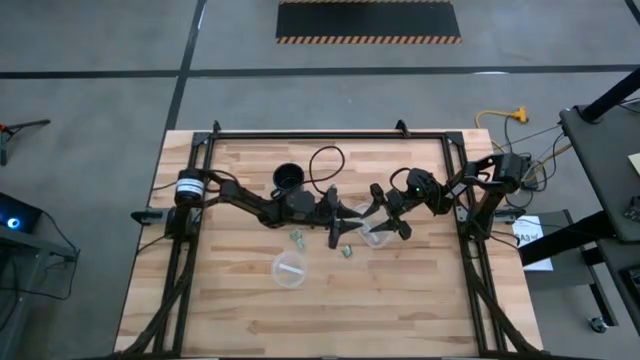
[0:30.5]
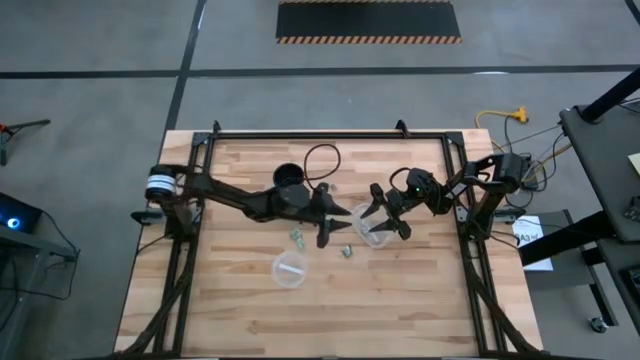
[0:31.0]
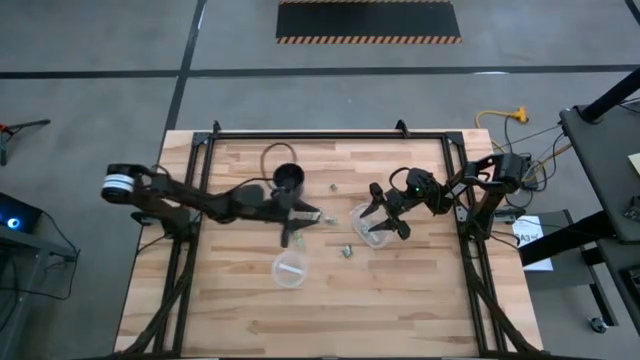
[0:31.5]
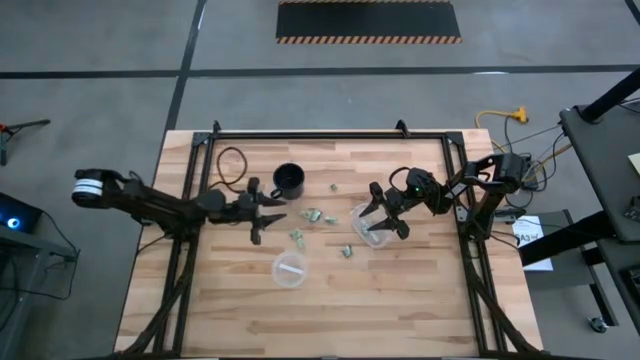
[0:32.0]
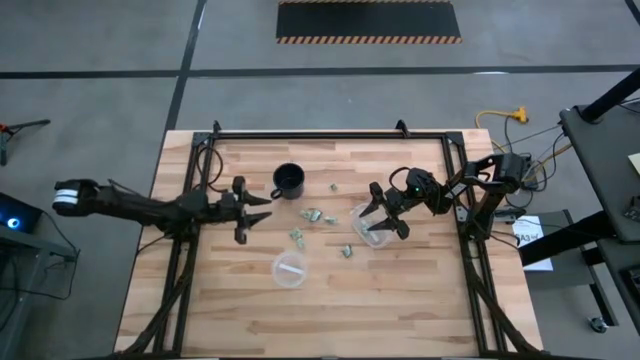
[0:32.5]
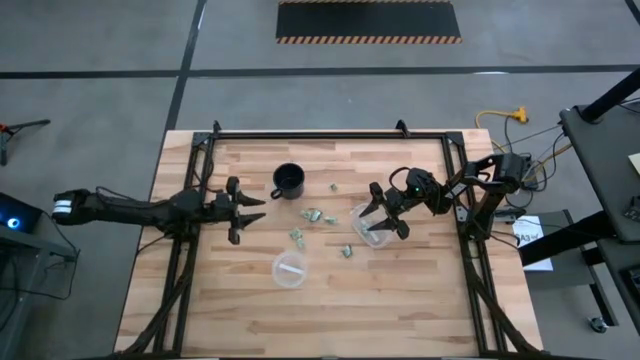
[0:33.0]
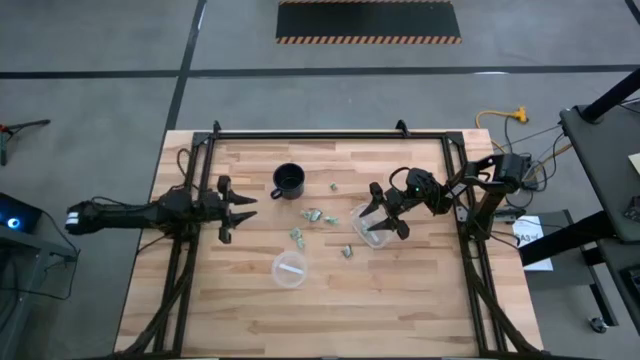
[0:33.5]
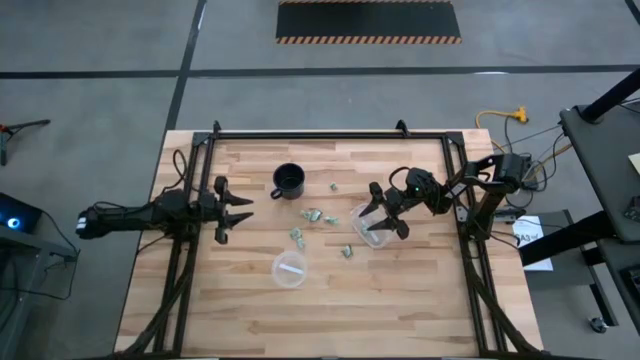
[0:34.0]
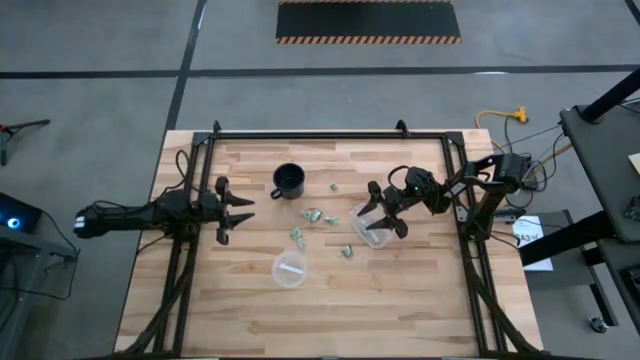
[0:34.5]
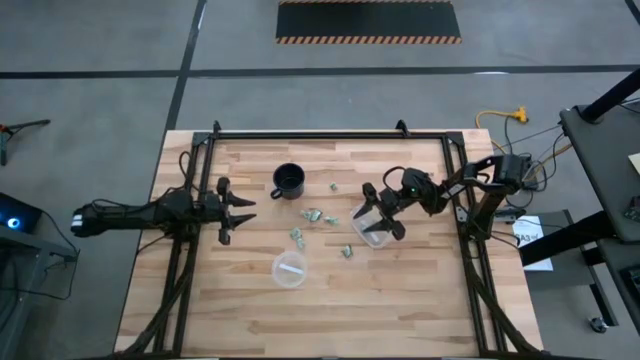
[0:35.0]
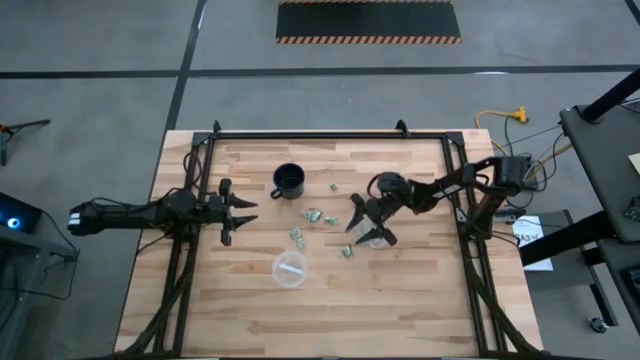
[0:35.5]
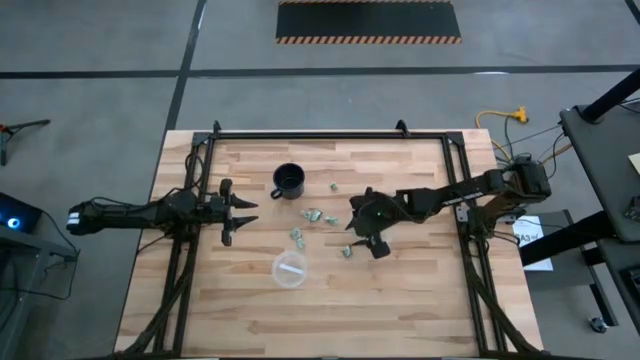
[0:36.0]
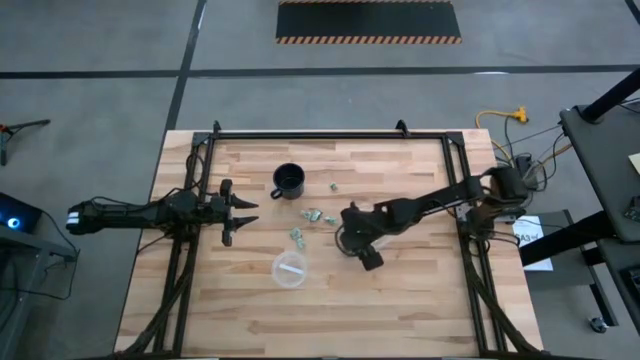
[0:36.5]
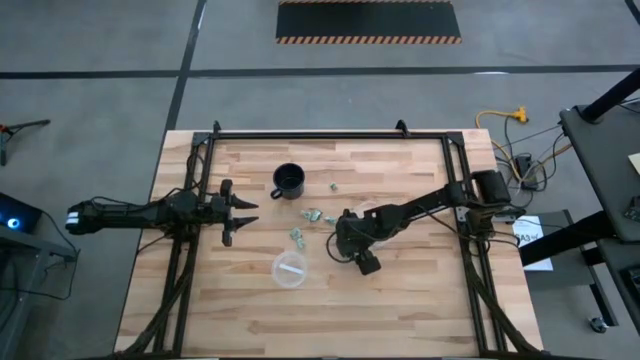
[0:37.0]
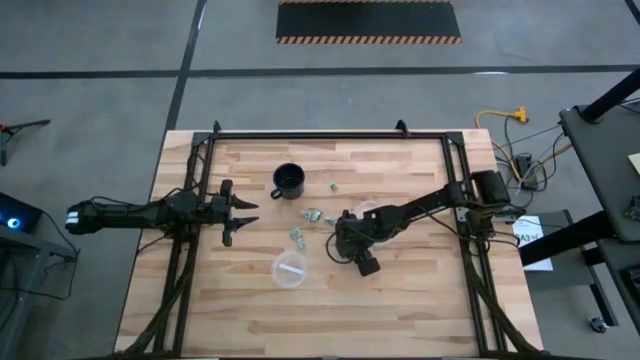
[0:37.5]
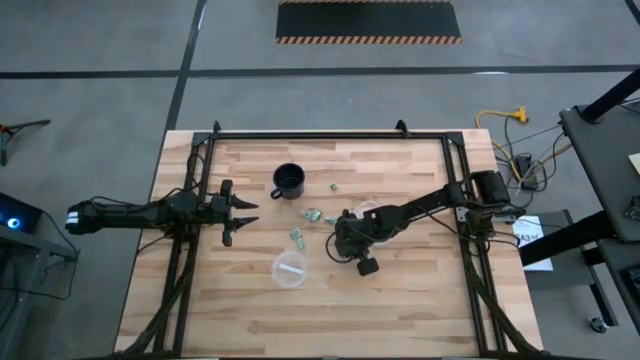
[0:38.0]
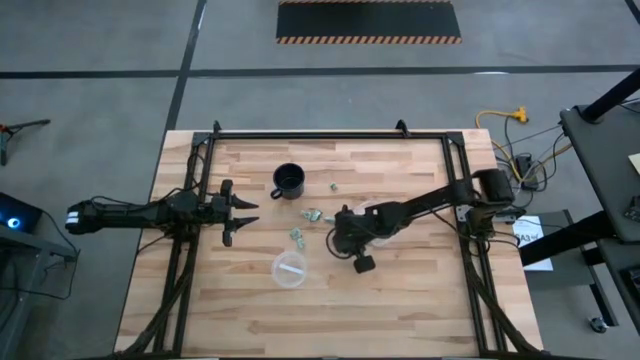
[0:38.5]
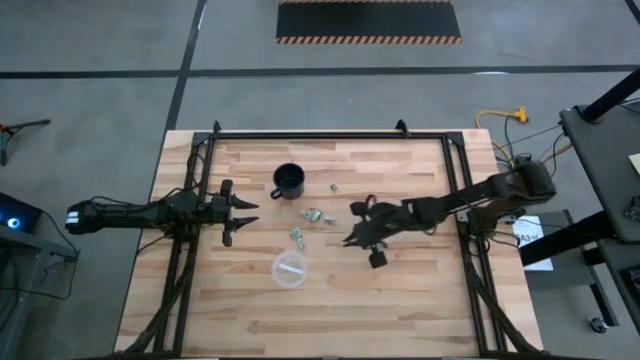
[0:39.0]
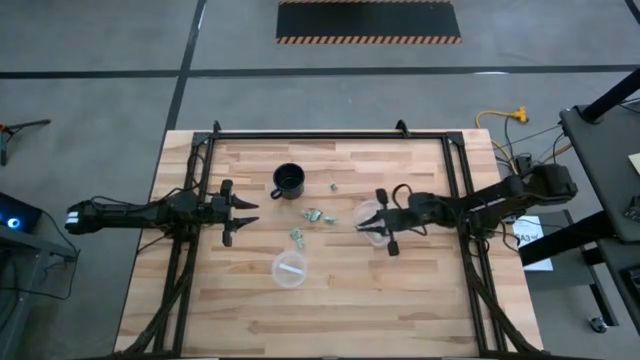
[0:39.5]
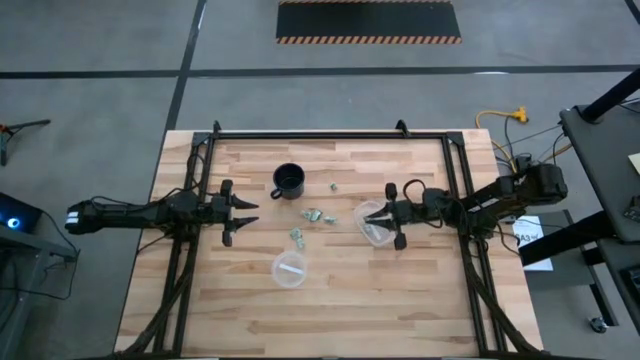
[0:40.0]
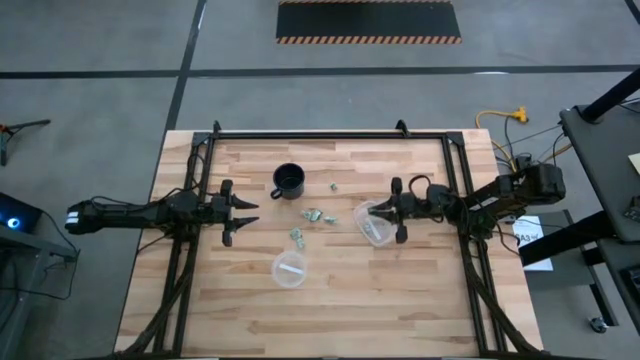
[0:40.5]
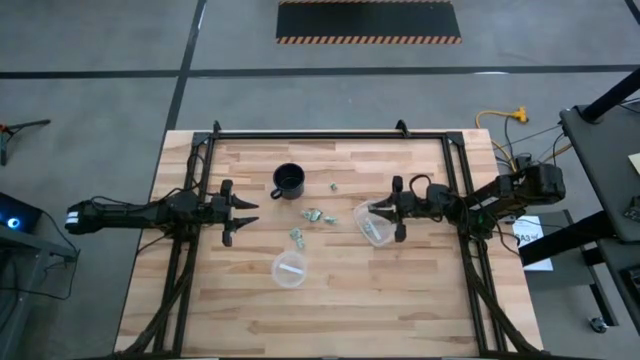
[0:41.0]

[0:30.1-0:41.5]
Task: Pick and place Stevia / Truvia into bins
Put the green stevia packet into the top transparent container

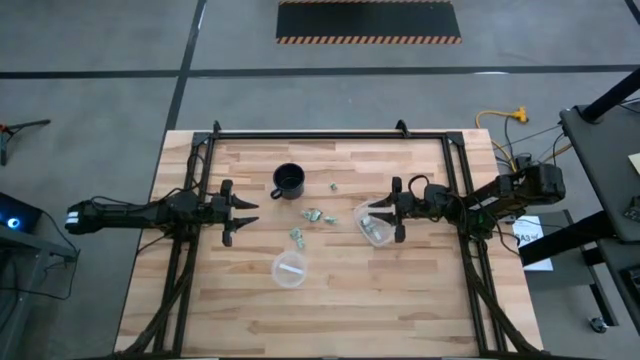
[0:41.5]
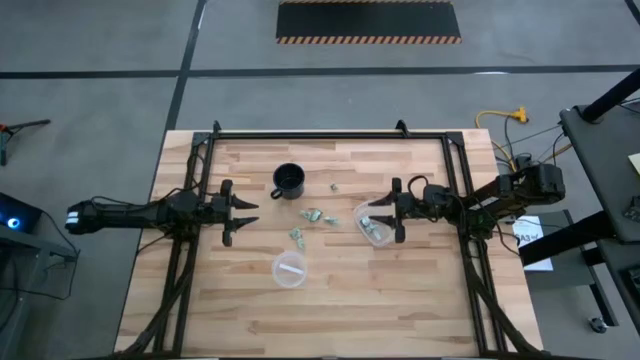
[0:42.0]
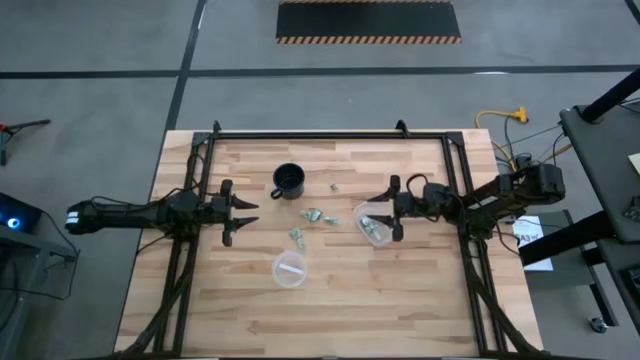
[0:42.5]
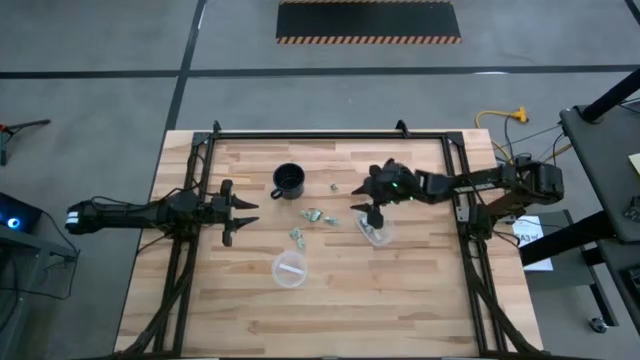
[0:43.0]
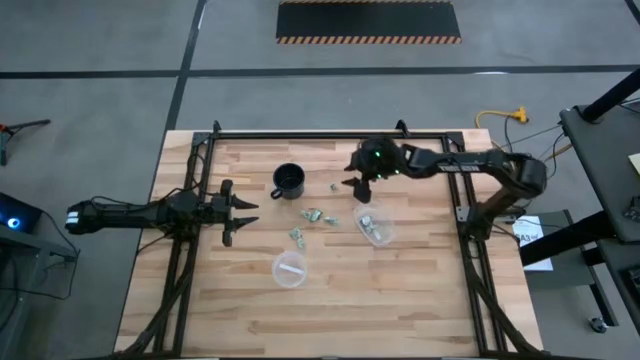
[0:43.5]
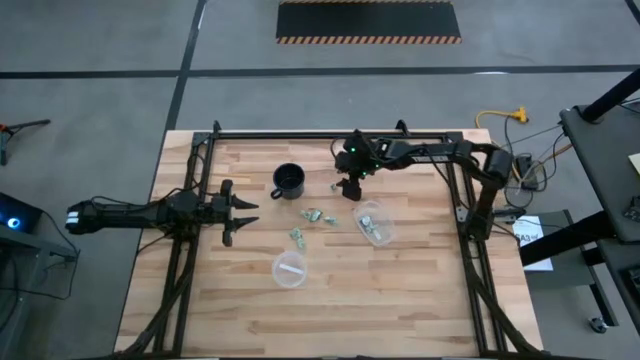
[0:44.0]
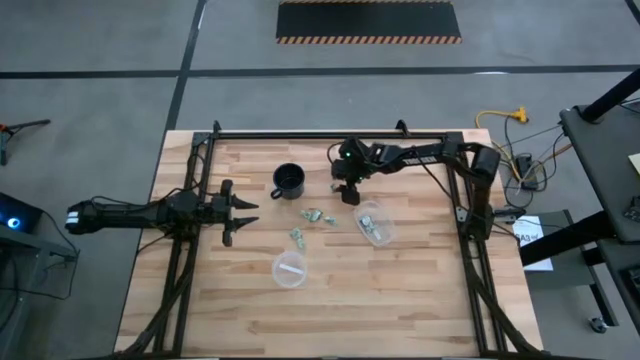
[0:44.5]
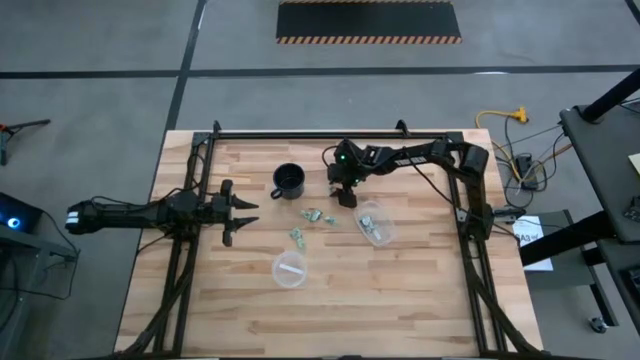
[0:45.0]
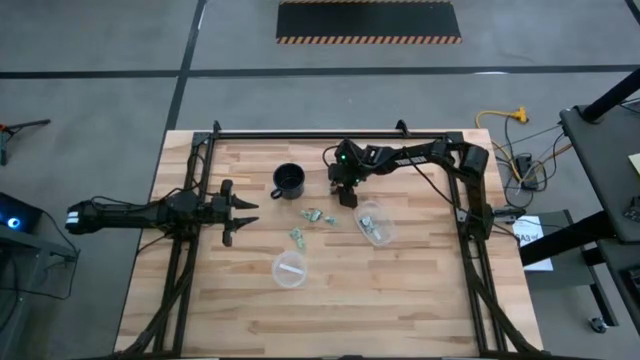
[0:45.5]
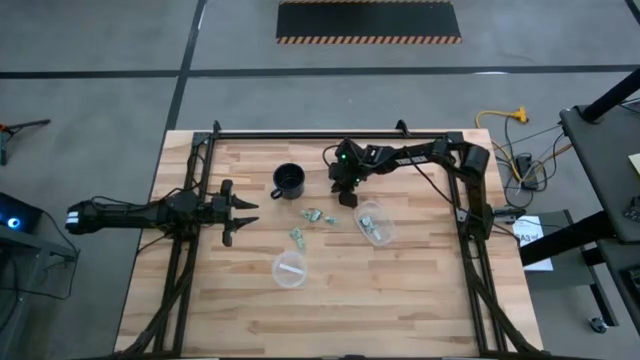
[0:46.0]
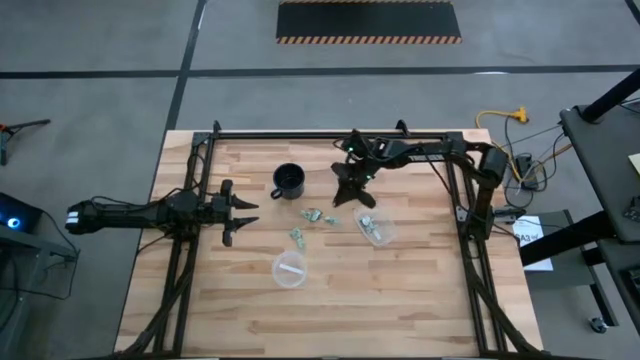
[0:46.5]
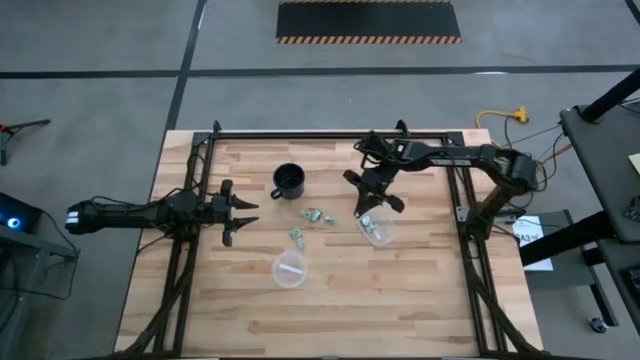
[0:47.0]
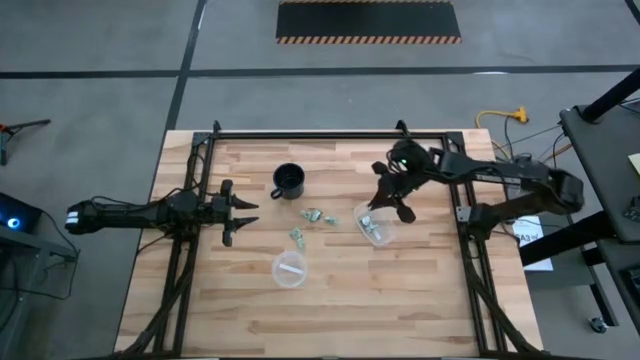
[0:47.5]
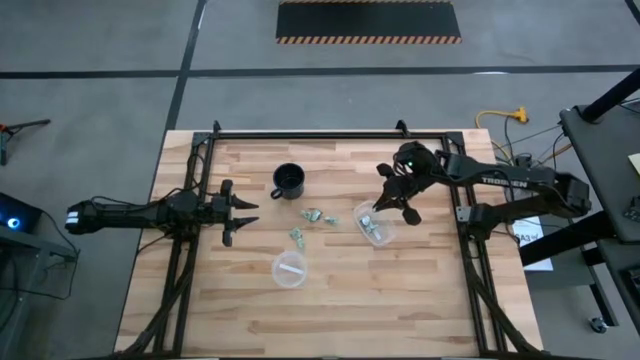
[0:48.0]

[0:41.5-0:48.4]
Put the white stevia packet into the top transparent container

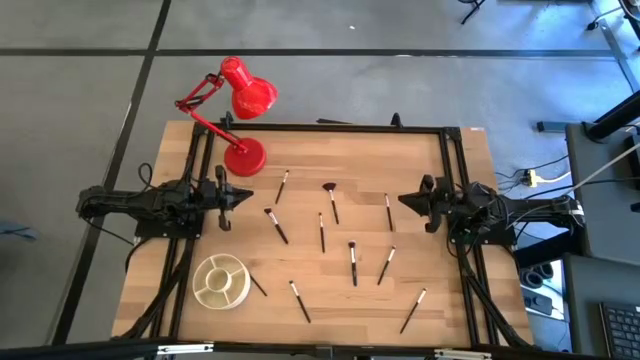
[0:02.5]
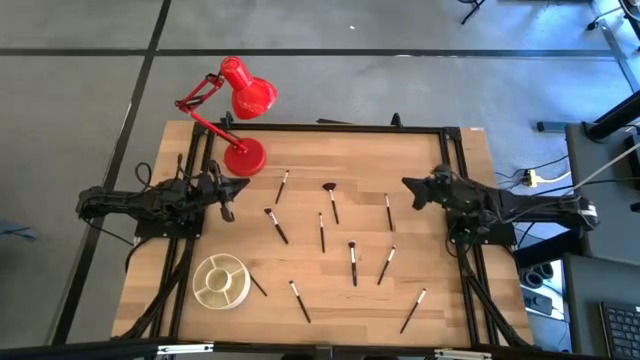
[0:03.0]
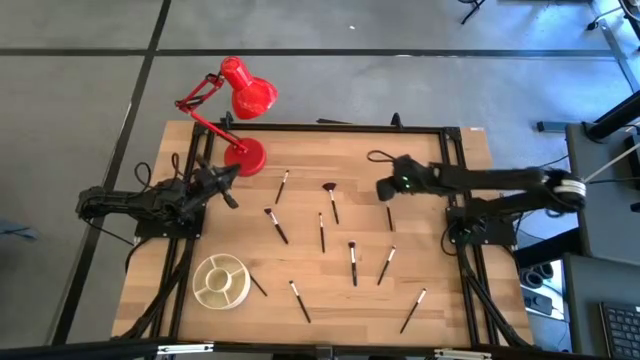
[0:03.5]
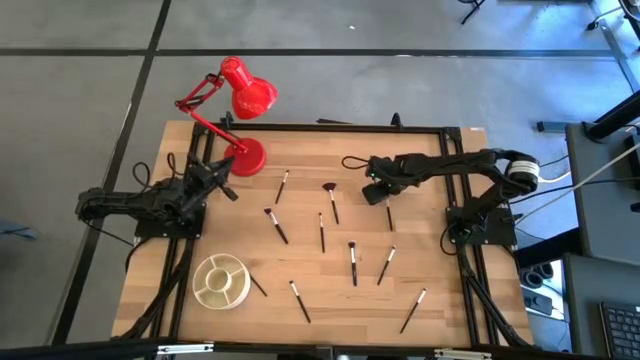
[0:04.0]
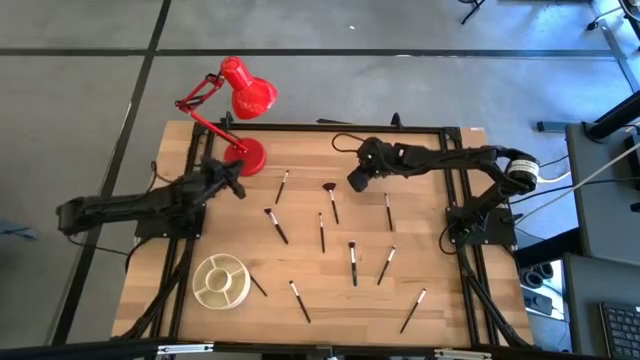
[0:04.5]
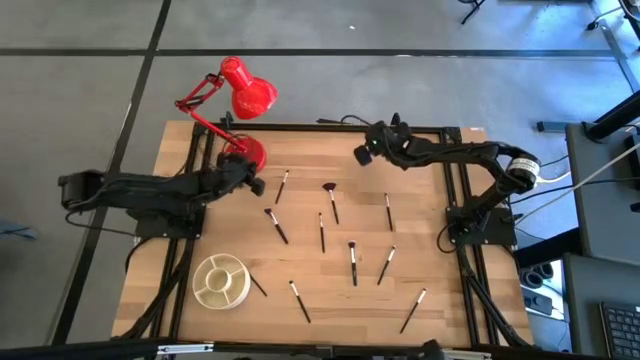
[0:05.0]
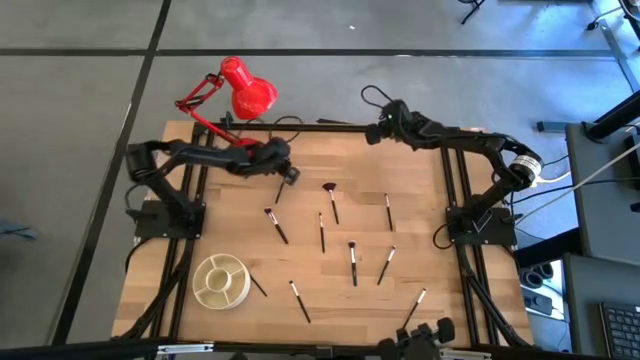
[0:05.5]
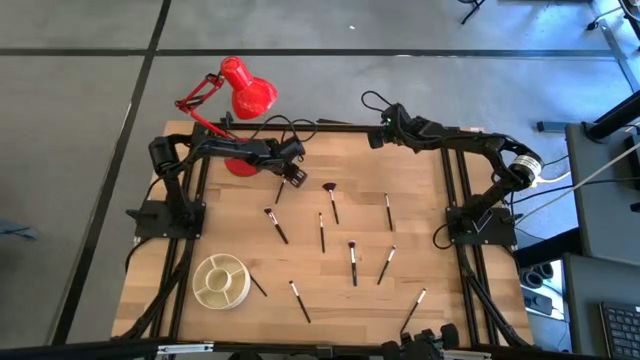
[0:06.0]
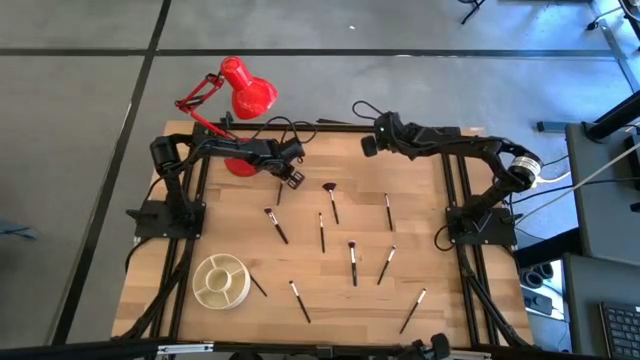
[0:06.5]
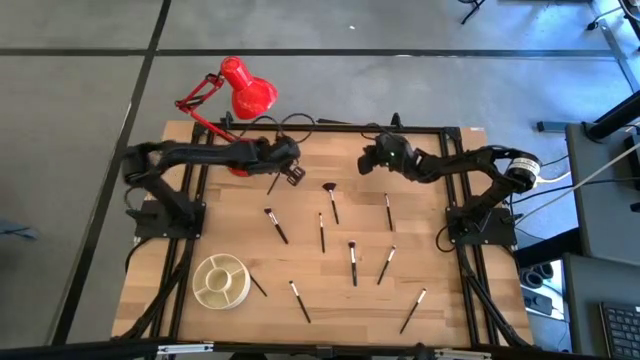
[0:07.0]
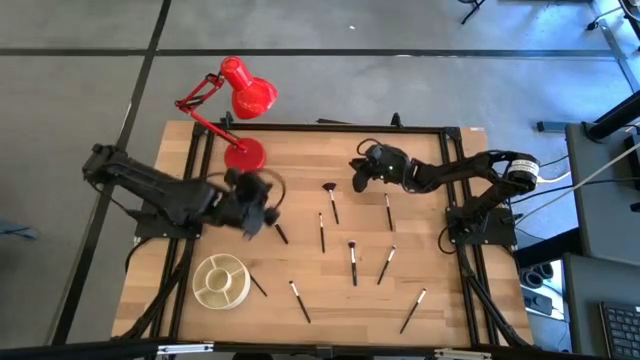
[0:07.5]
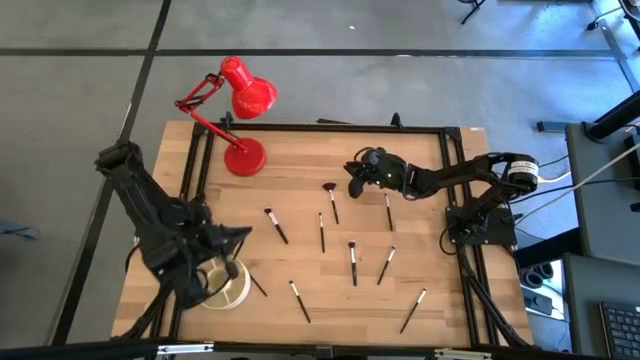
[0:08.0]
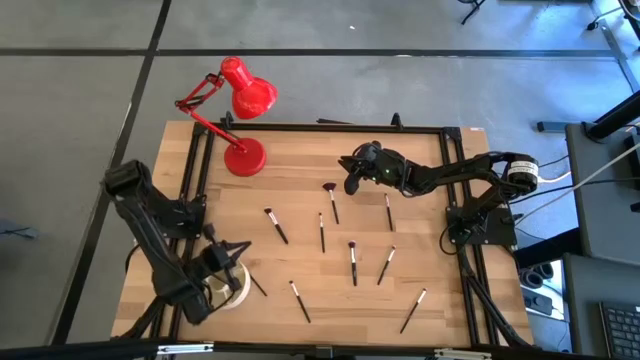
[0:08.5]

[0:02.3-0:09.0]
Task: Put items in baskets/containers
Put the black eyeshadow brush into the white organizer bin
